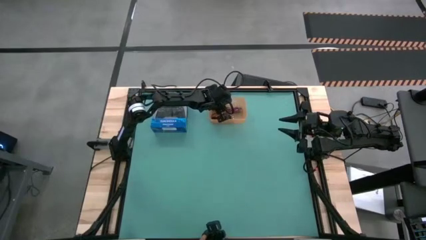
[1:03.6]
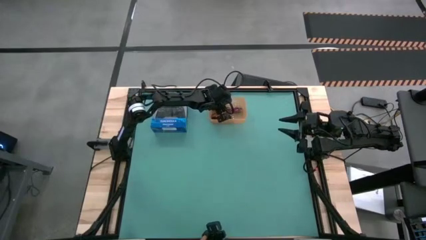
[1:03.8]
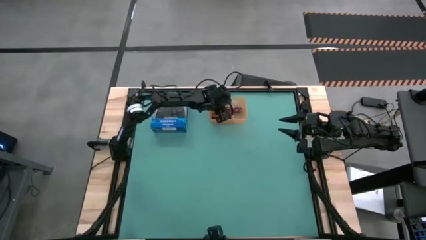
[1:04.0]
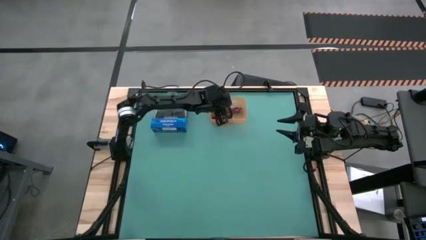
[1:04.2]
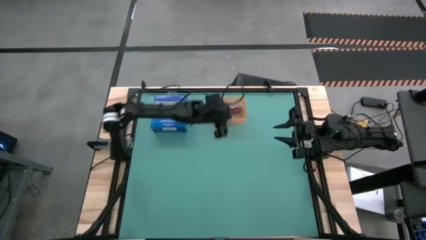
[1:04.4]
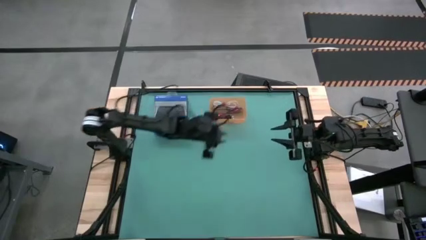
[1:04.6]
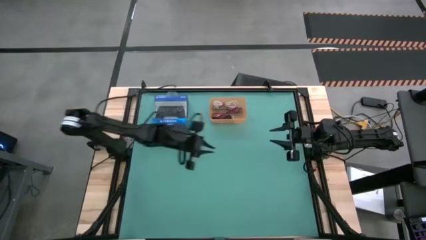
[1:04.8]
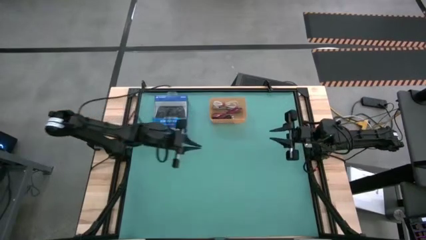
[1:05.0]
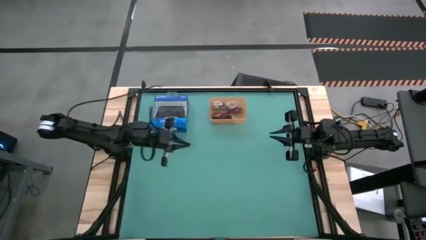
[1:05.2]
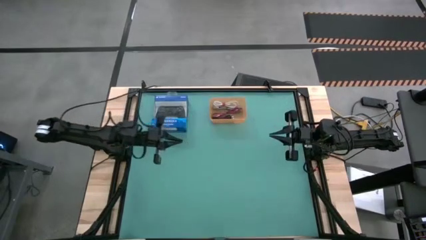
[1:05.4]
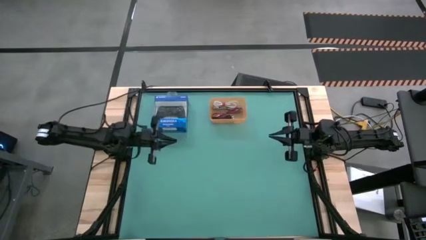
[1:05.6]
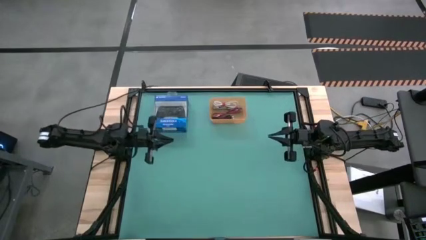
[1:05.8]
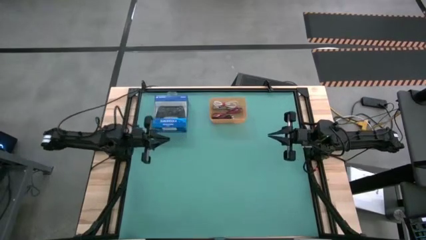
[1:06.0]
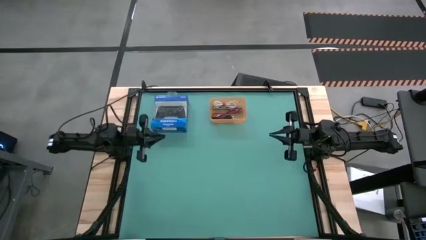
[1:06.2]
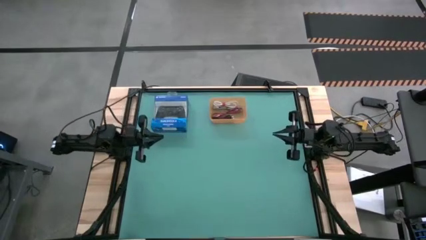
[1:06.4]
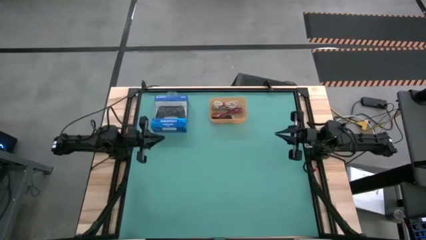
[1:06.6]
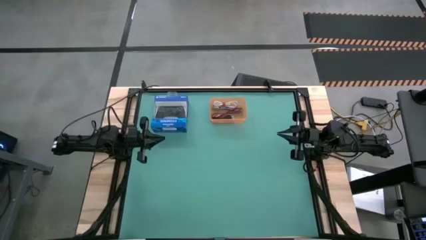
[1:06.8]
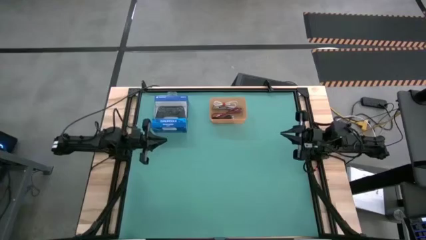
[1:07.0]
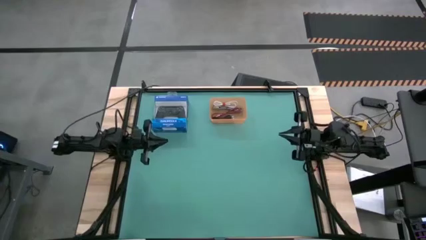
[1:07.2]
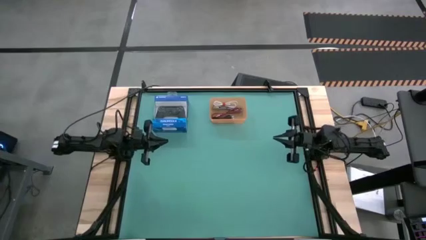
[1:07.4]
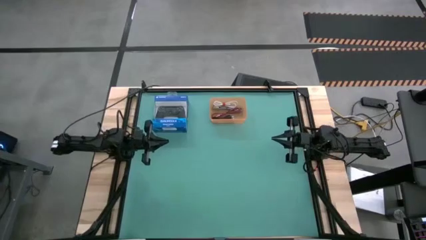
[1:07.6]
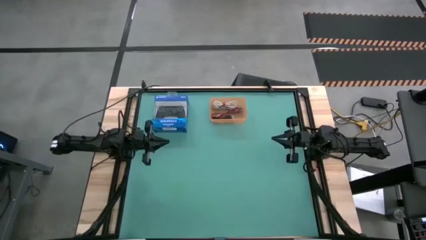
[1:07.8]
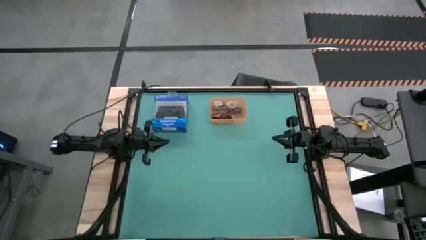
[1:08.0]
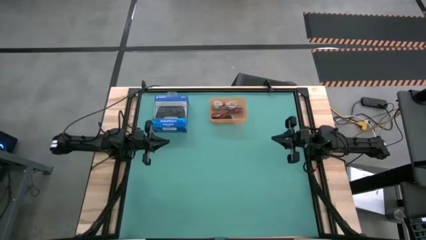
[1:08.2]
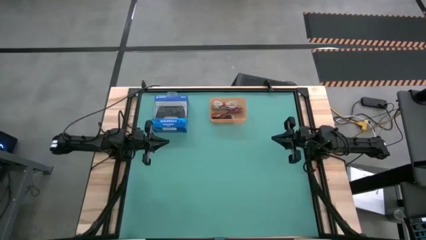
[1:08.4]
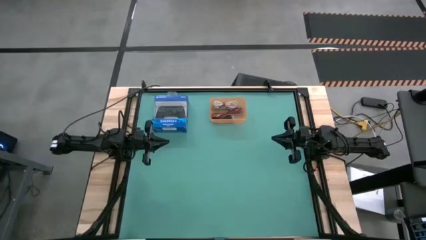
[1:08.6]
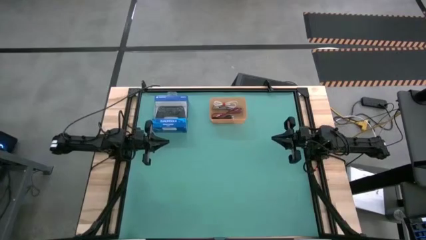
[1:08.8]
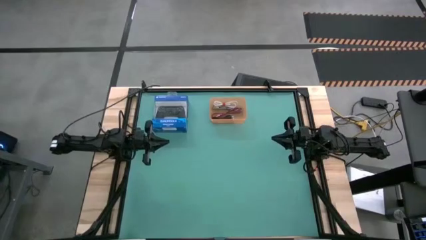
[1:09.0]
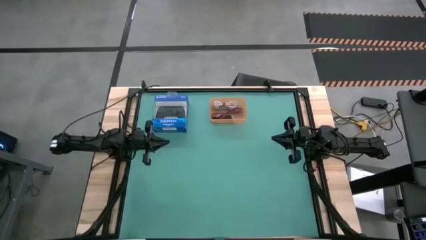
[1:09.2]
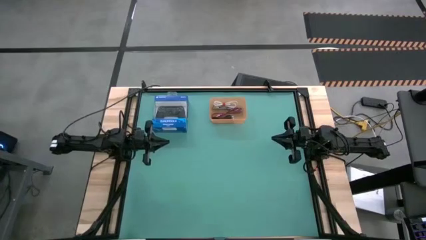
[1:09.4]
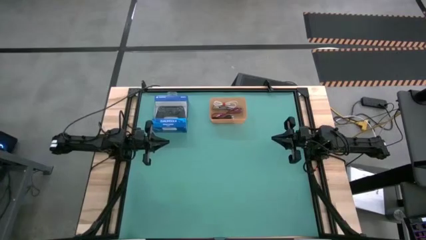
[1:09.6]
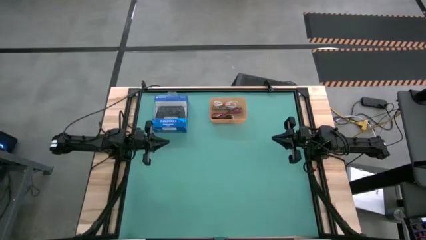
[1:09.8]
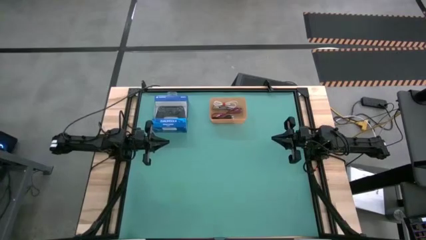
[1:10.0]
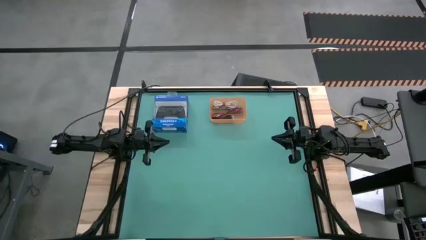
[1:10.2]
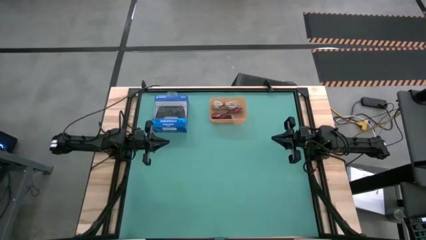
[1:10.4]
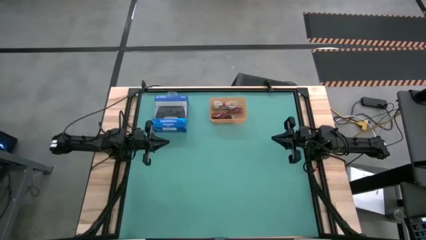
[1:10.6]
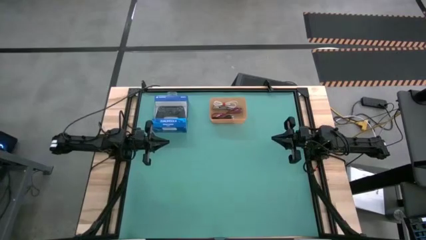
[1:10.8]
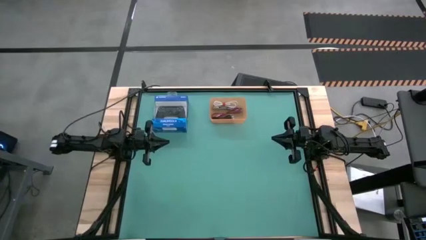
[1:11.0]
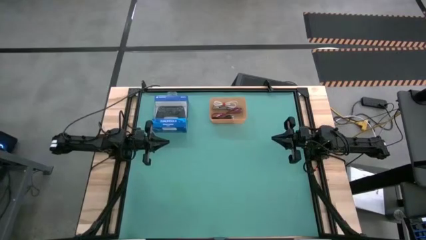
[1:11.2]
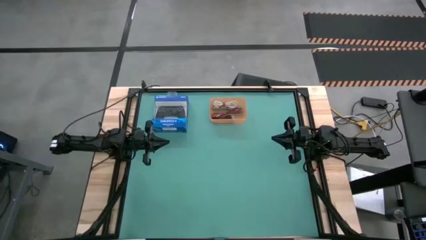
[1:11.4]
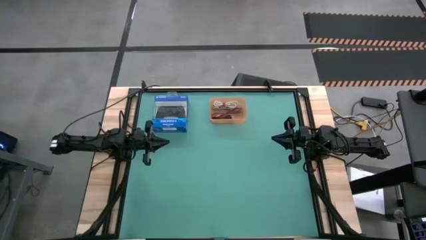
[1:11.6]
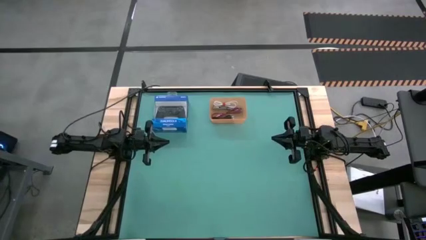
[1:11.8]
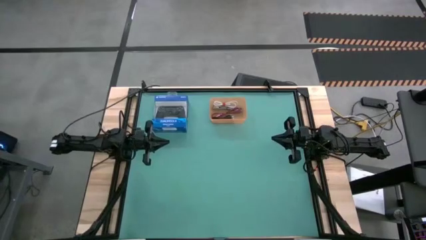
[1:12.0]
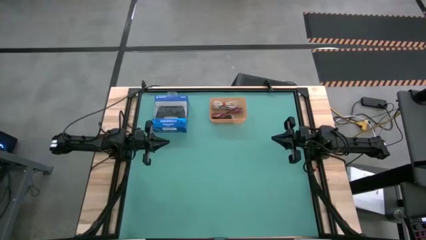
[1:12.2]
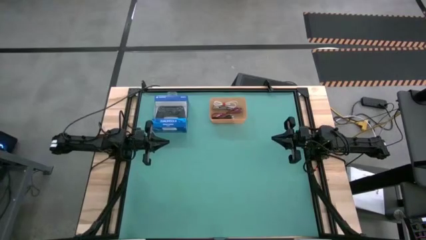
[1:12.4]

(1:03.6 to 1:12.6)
Task: Pick and place USB-C Cables
Return to Home Position

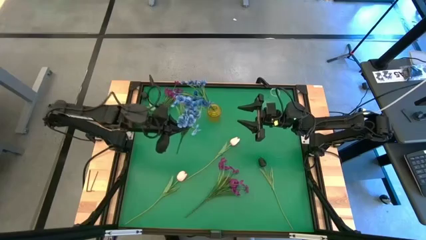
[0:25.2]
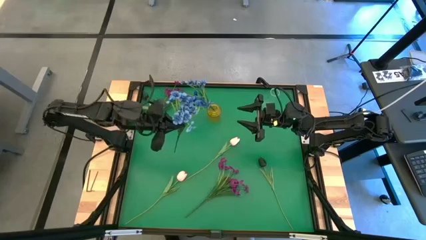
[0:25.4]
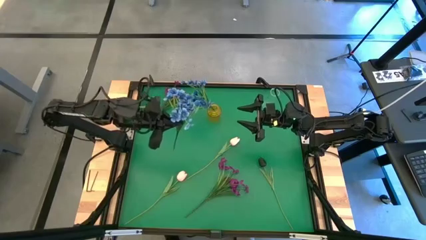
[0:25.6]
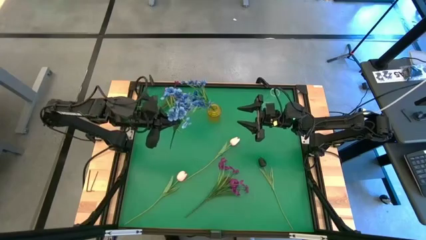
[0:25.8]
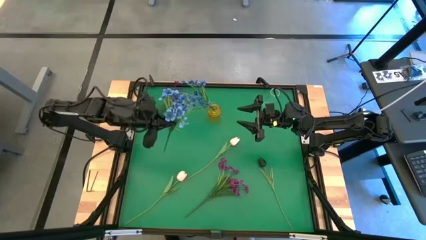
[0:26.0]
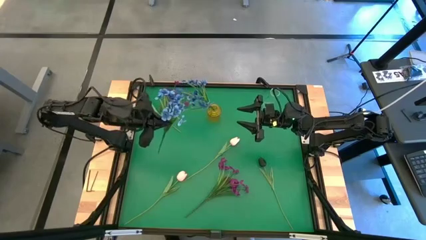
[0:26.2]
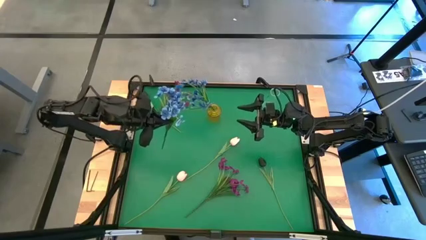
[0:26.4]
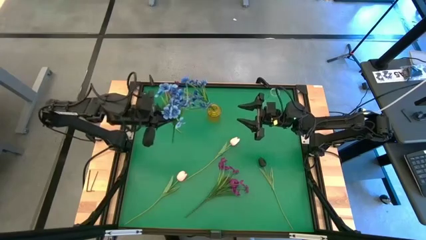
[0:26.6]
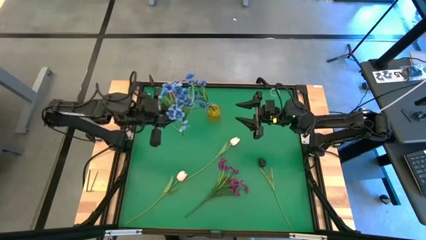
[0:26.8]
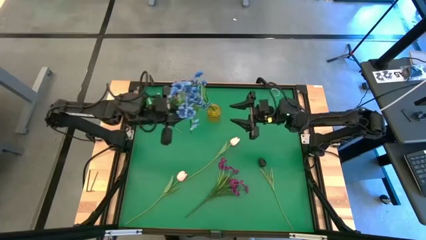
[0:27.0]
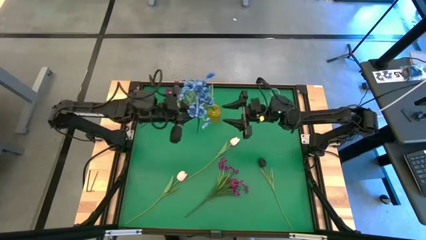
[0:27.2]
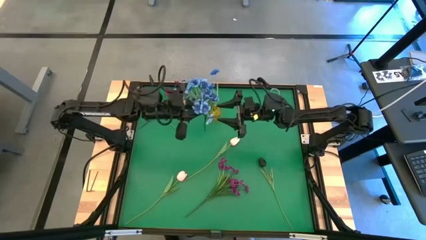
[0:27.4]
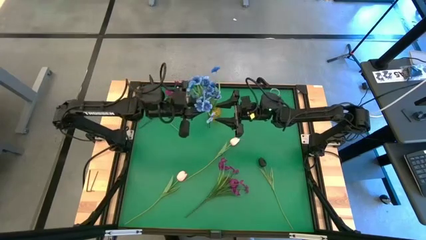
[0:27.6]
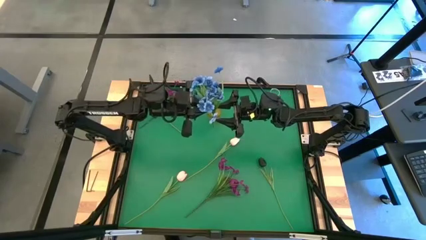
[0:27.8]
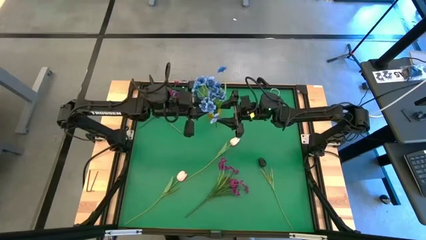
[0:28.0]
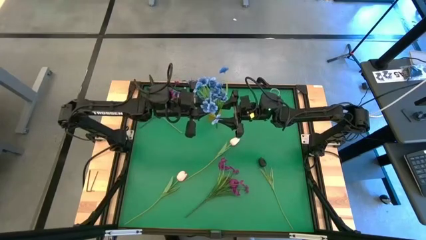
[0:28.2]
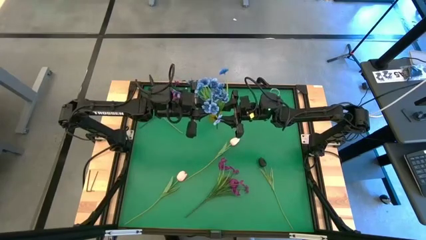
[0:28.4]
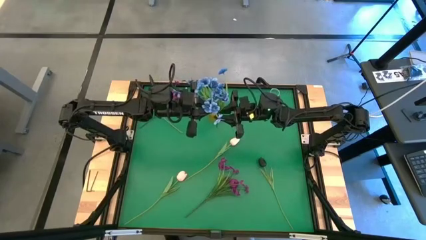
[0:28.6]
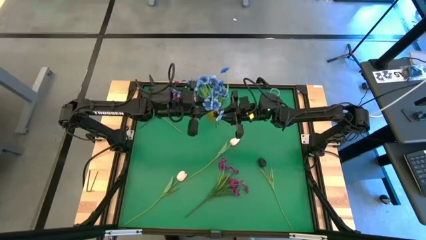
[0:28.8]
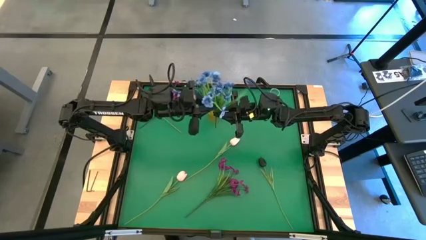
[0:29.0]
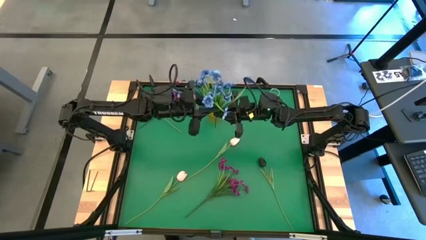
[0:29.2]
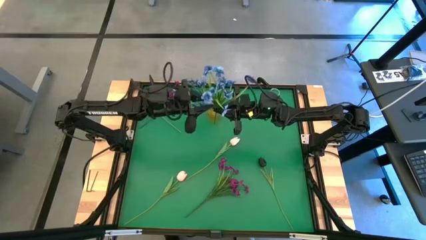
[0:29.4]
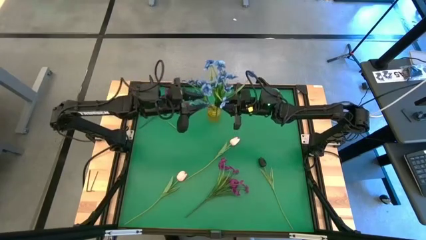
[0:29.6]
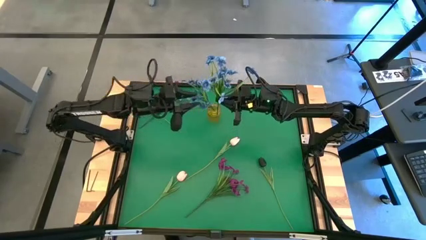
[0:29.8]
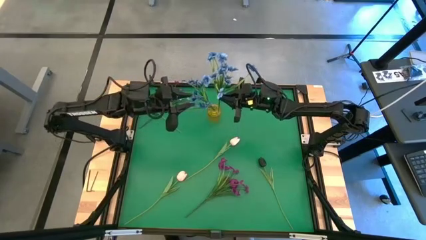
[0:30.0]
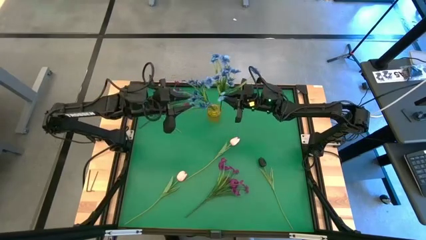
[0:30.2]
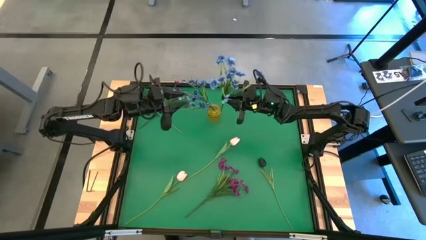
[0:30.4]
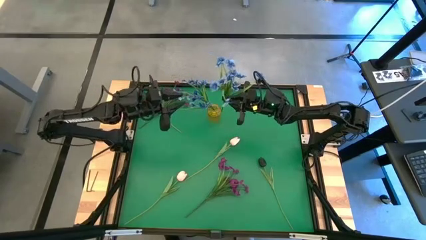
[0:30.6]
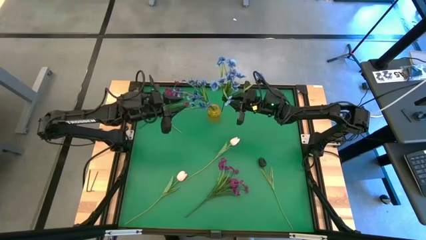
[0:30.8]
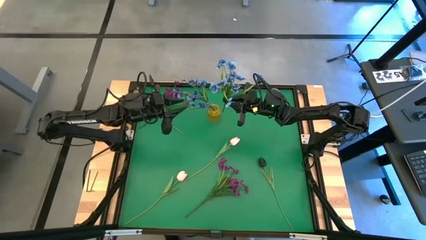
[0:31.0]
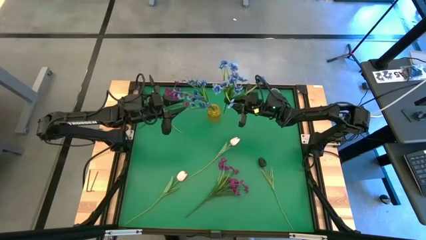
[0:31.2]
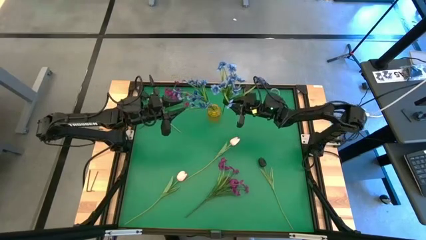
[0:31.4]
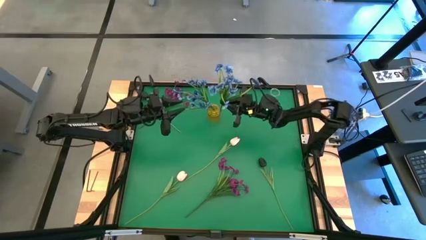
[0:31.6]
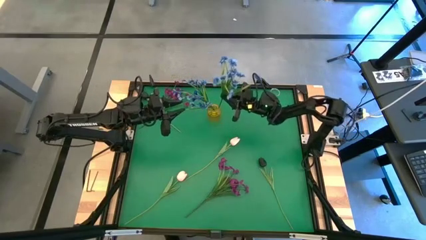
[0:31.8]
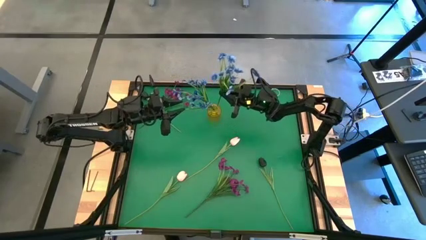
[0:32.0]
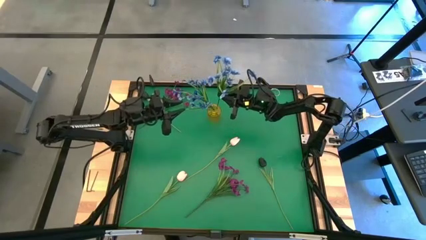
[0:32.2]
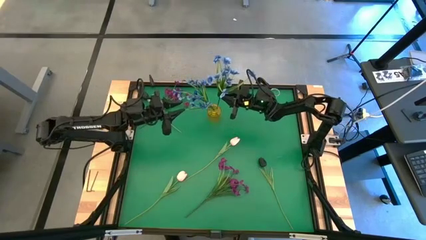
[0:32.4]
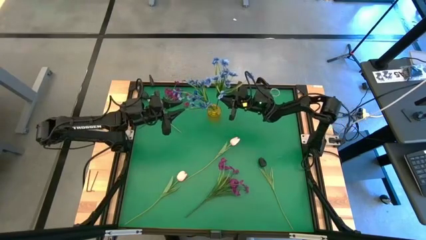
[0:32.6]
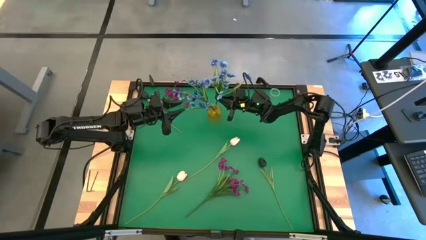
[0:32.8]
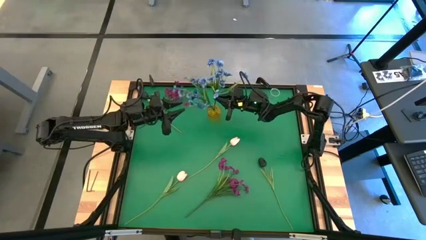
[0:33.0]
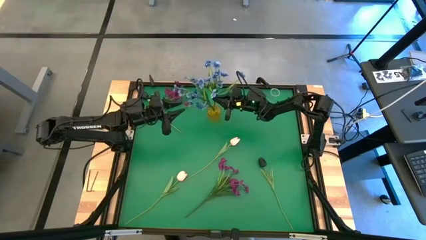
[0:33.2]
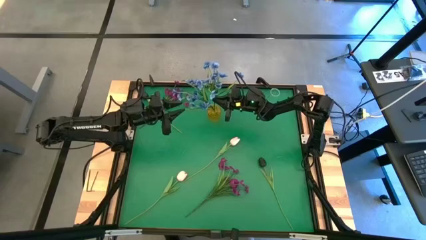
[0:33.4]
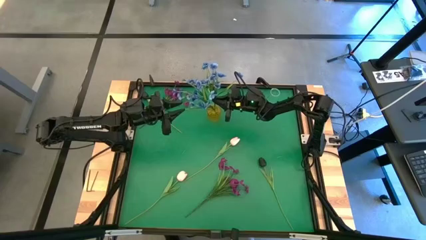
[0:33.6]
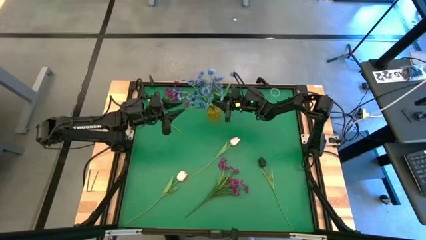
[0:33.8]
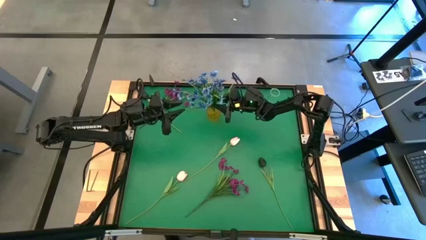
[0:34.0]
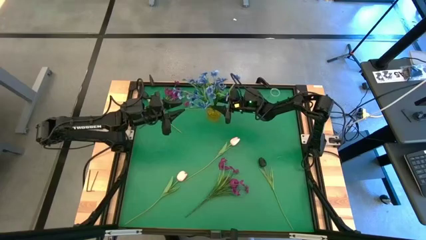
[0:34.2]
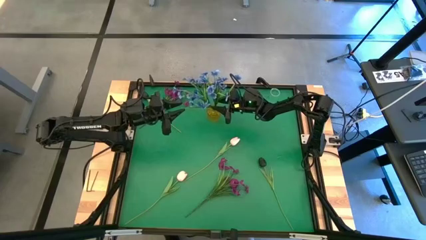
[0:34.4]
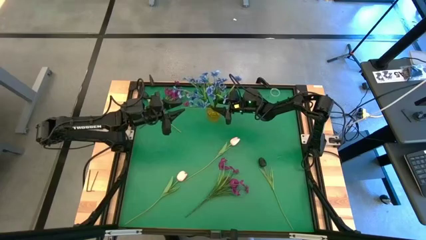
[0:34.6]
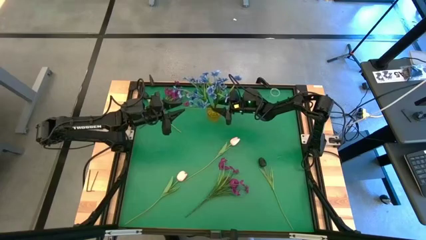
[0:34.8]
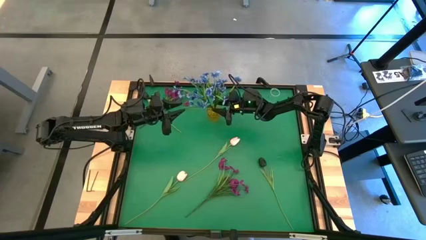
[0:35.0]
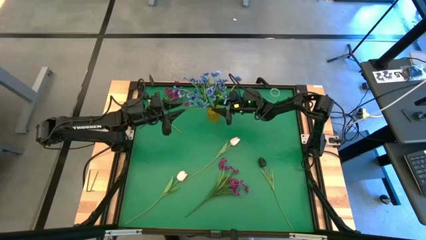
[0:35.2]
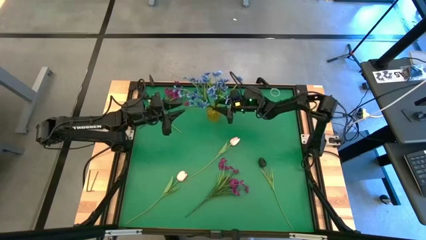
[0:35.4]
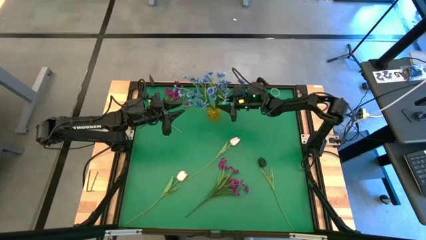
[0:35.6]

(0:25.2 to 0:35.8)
Task: Sort flowers into vase by color
Put the blue flowers into the yellow vase
